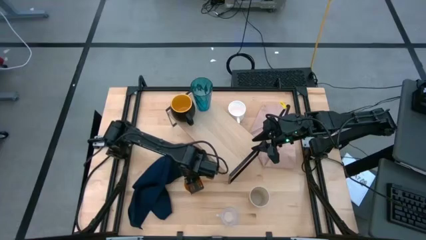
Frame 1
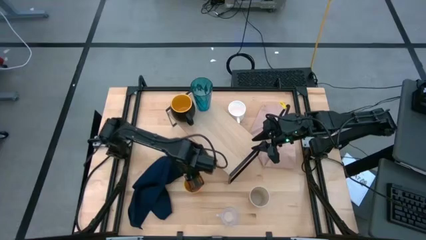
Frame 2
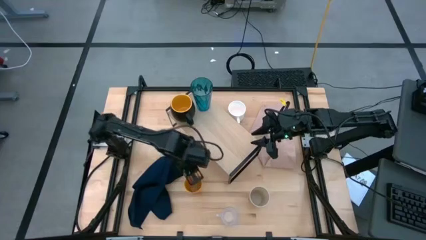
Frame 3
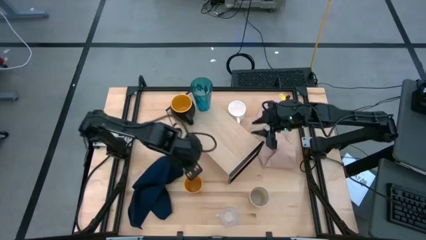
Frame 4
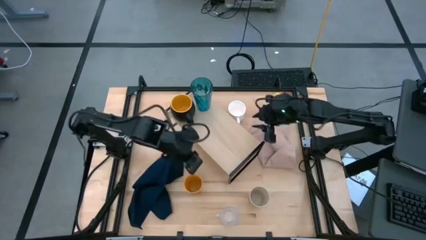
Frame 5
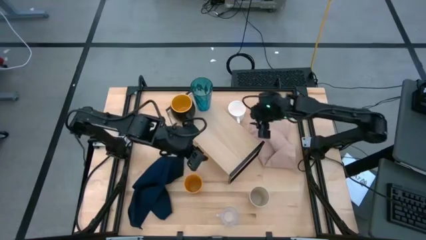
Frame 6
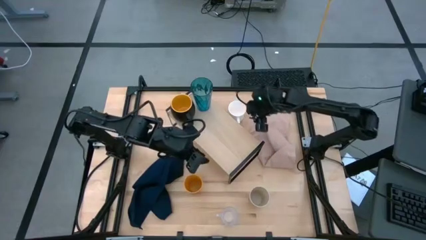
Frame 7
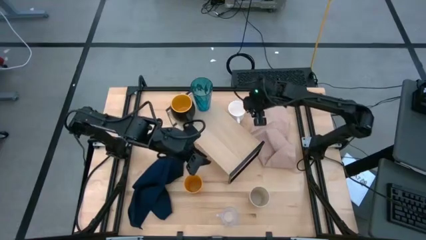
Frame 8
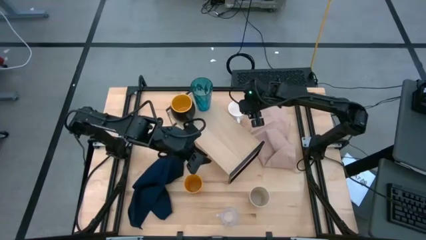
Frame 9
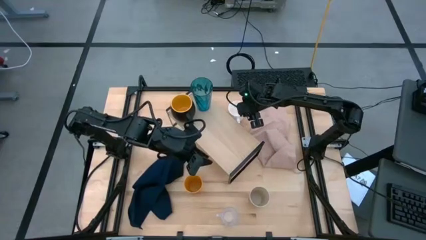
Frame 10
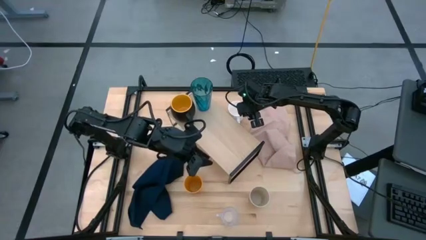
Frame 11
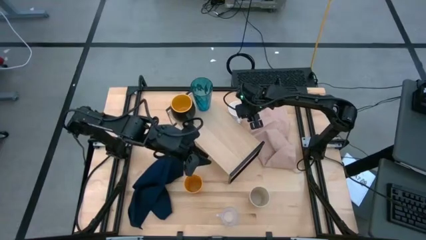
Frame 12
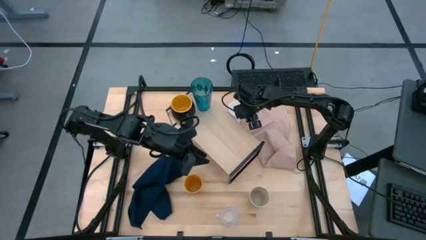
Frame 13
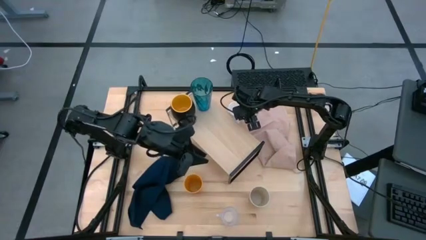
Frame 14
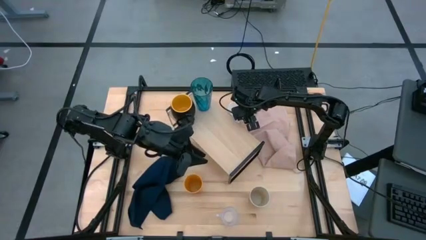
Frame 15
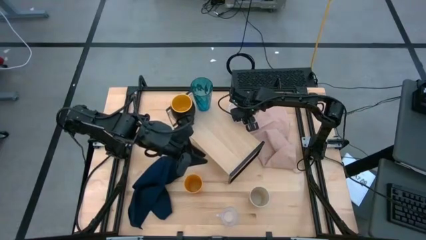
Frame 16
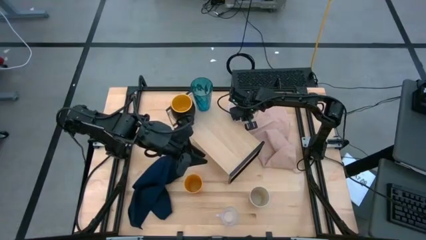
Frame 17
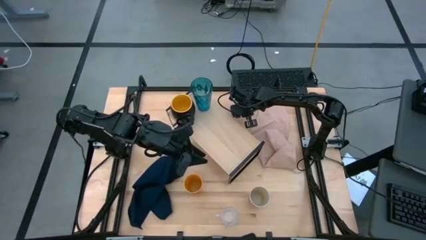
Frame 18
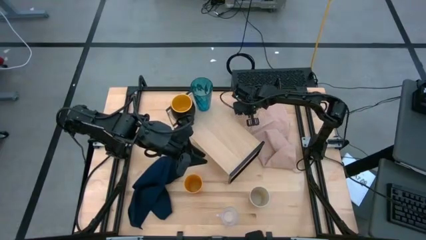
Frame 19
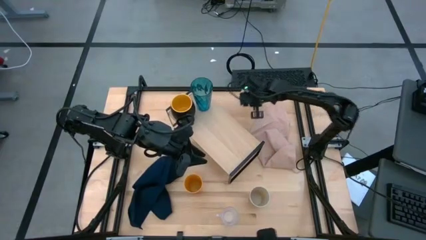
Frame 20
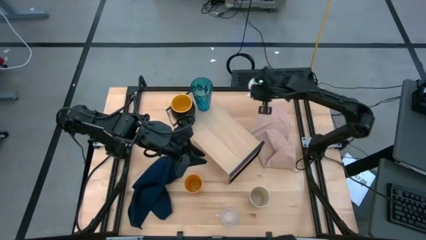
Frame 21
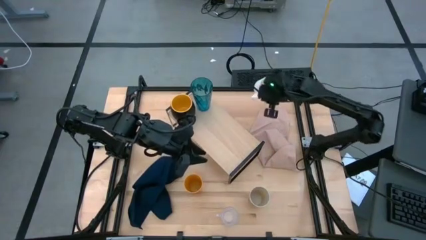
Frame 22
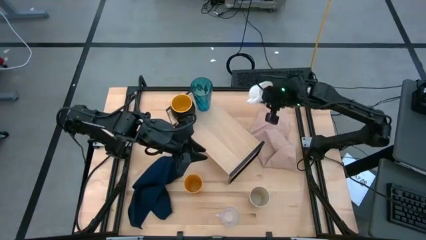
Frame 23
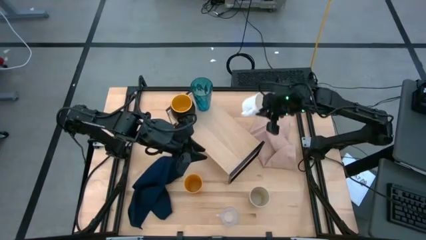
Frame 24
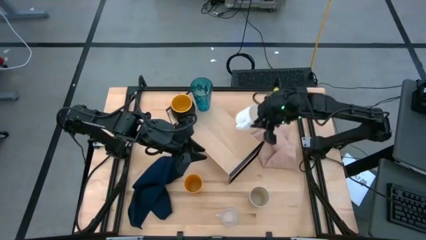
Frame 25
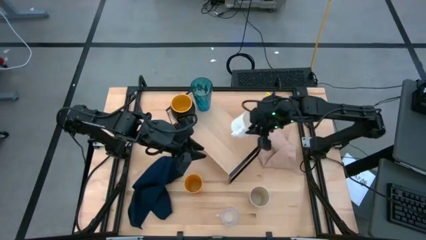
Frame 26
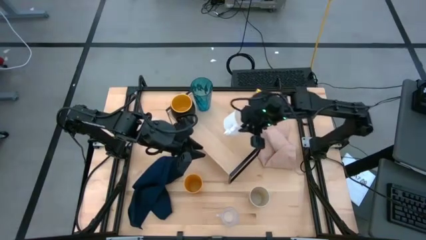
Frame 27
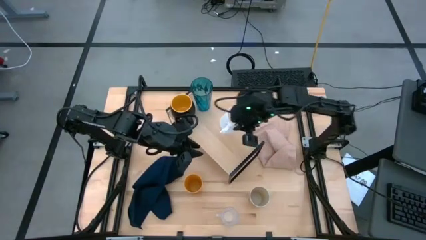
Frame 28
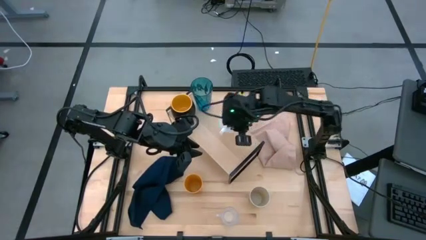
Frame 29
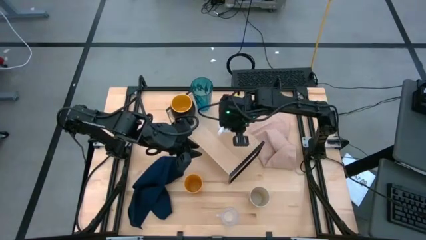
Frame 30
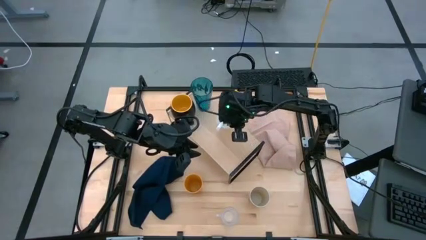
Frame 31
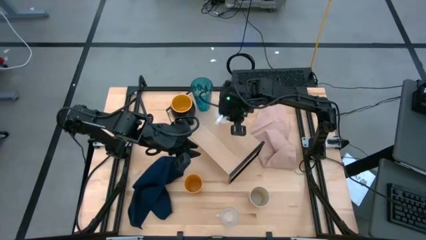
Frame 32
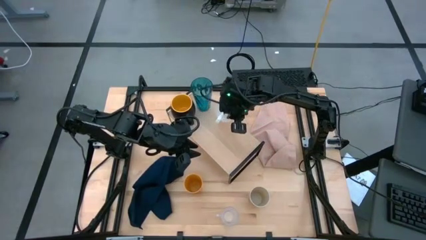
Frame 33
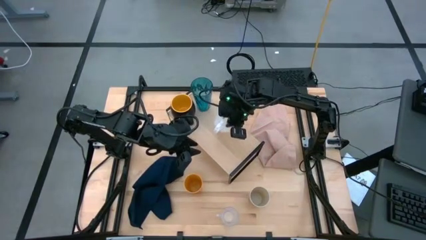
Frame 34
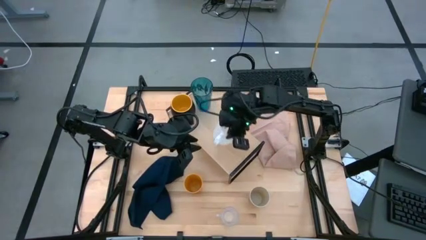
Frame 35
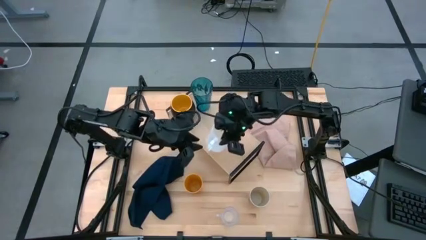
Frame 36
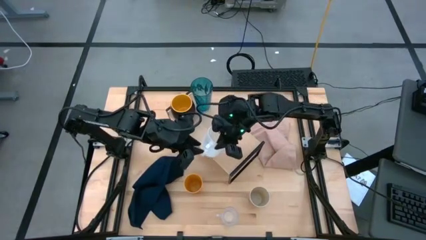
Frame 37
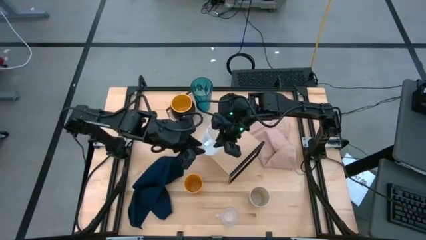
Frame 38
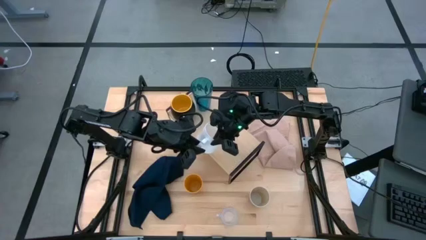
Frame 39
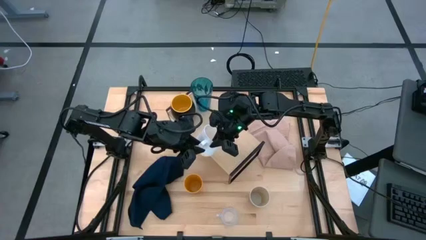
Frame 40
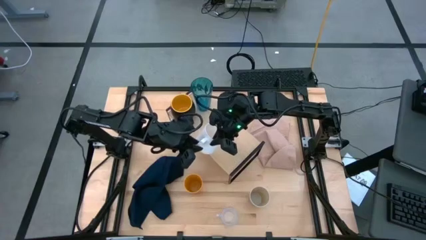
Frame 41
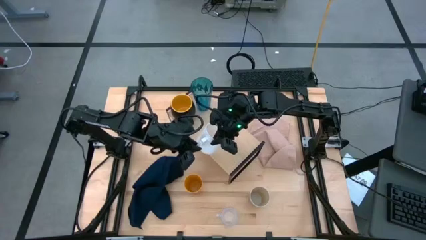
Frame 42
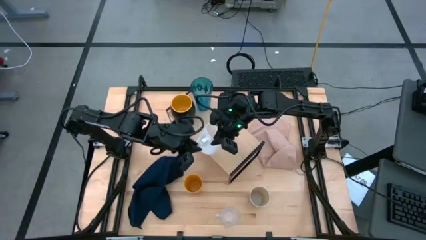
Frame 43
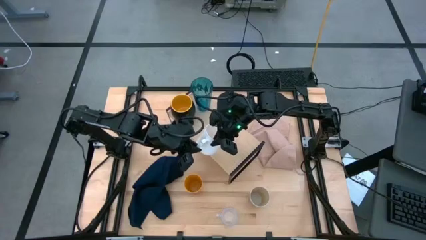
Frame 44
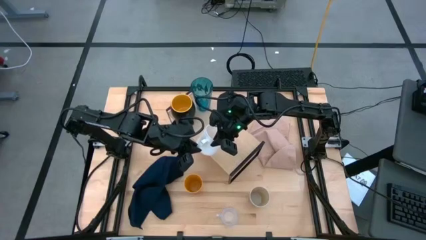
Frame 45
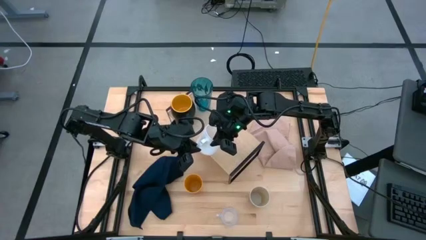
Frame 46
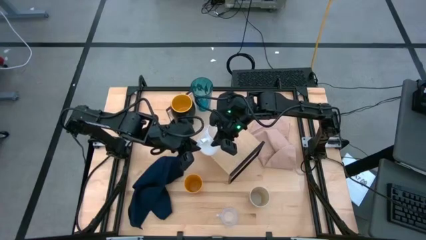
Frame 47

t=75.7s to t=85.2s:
Task: Stack small to large cups/mugs on shelf
Put the white mug on the shelf
